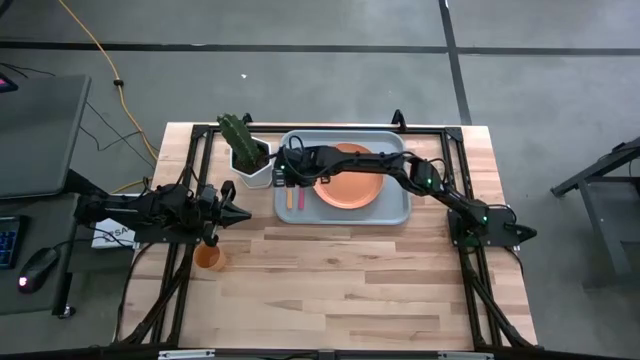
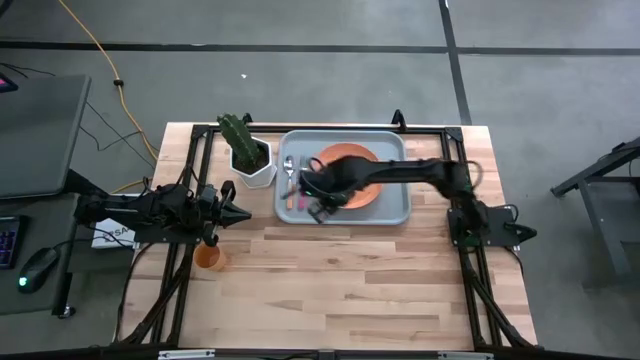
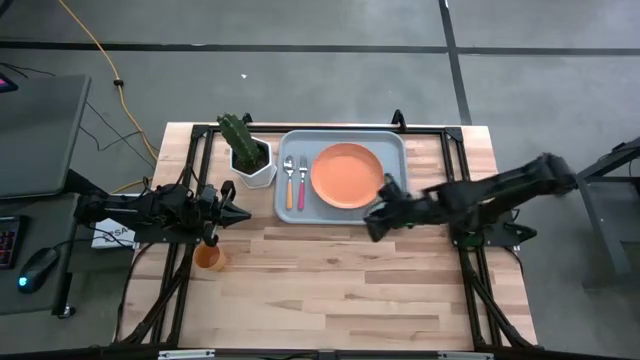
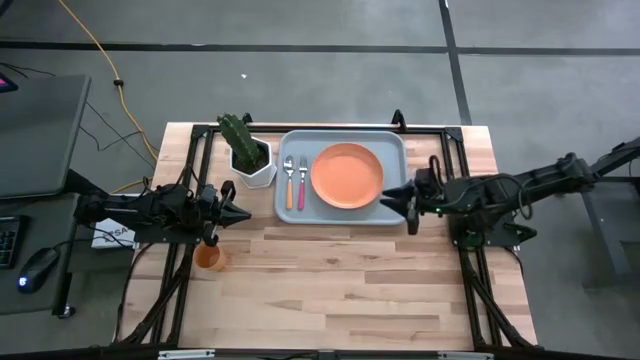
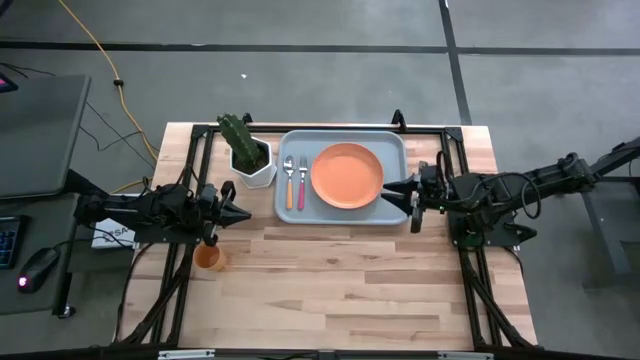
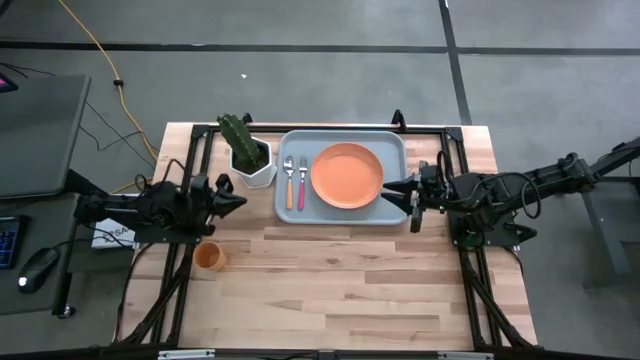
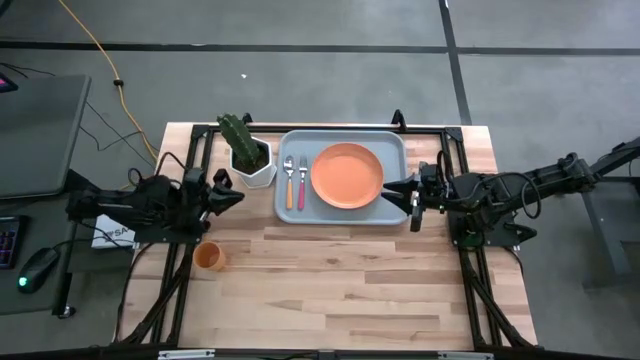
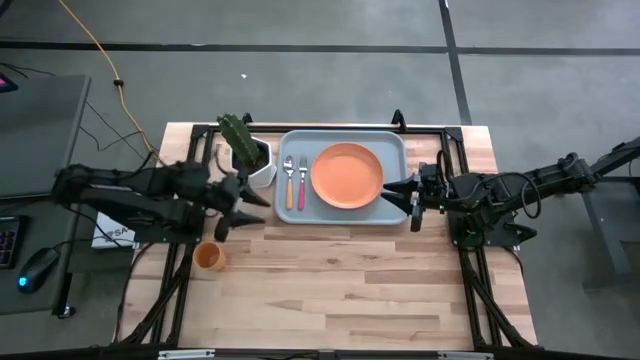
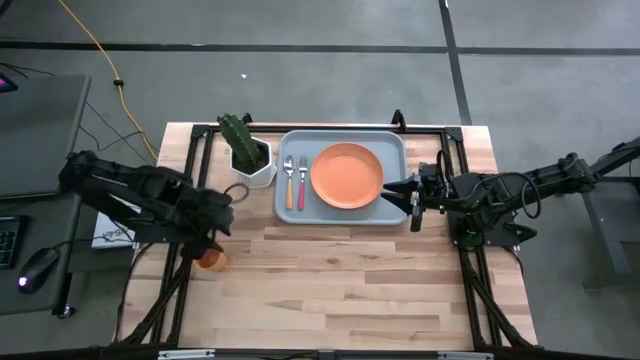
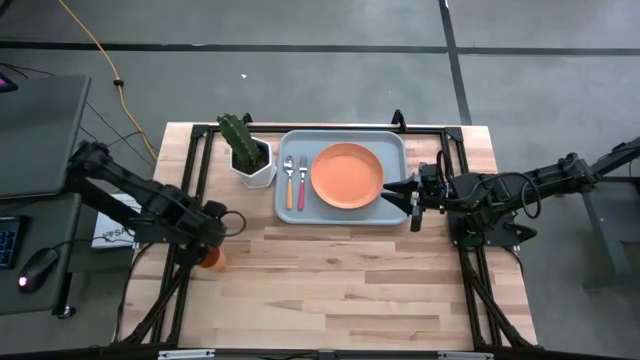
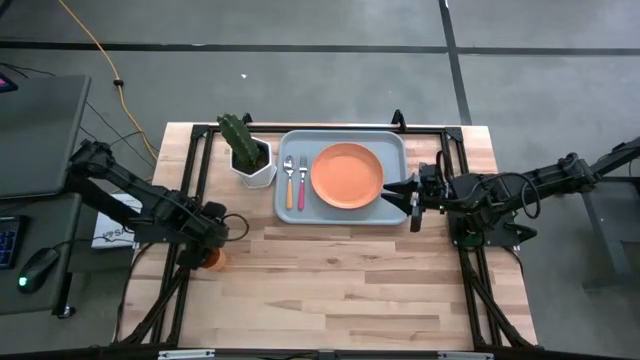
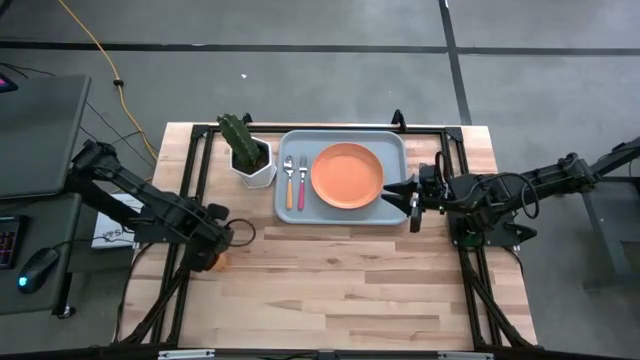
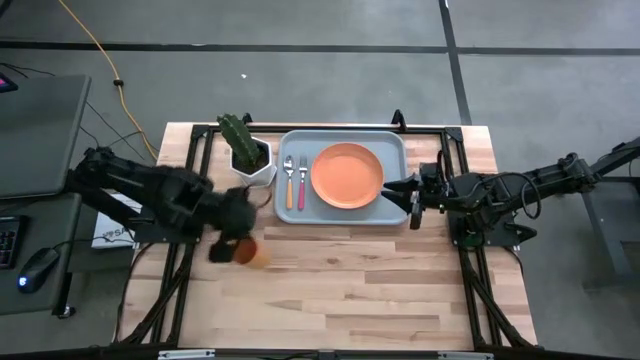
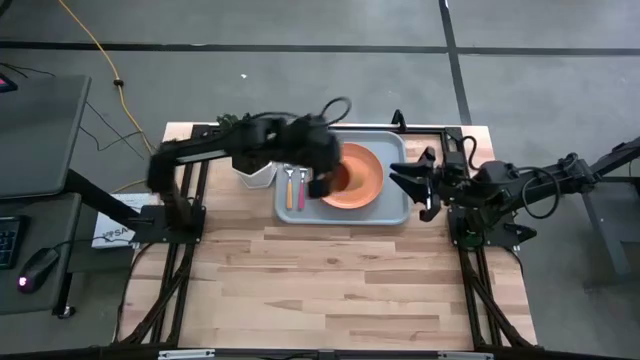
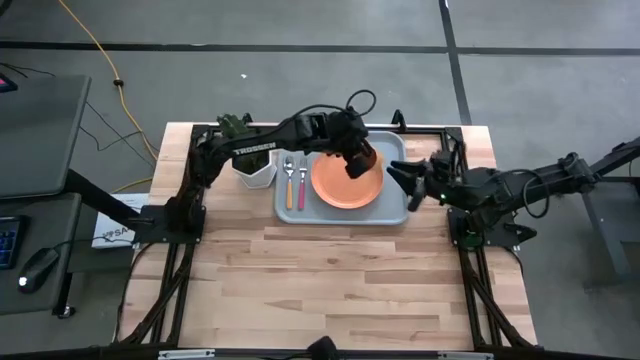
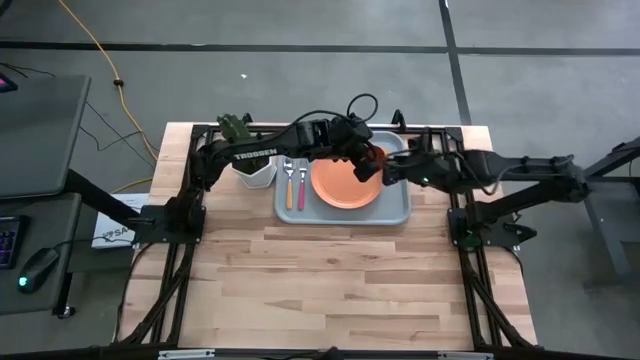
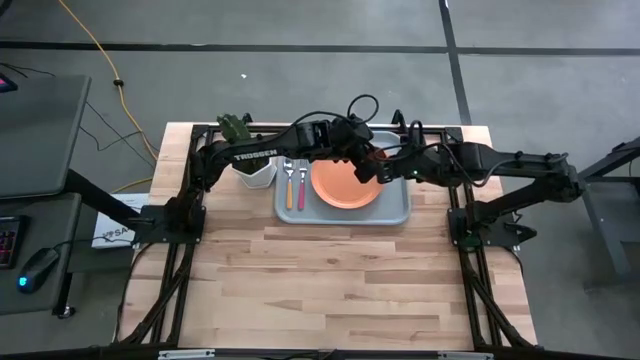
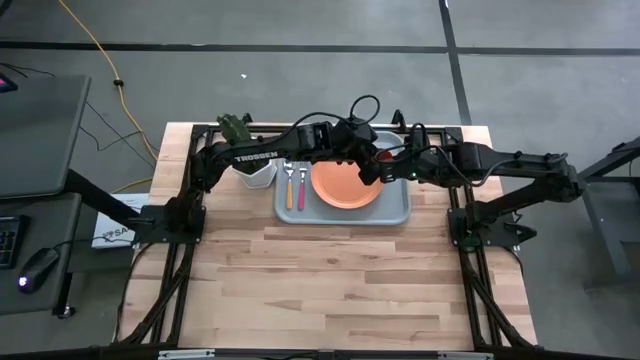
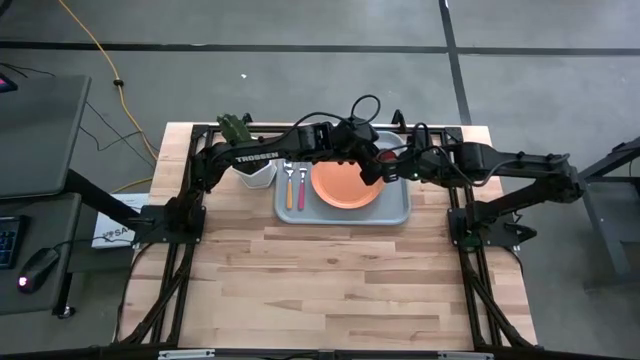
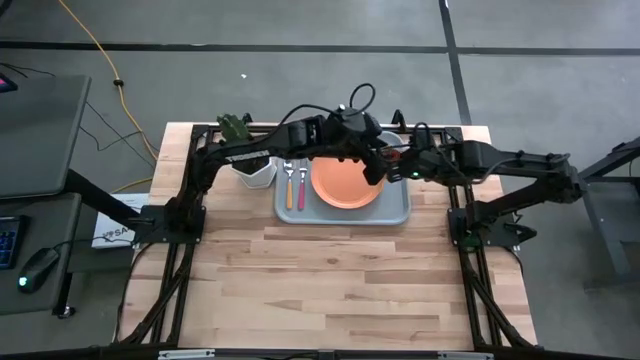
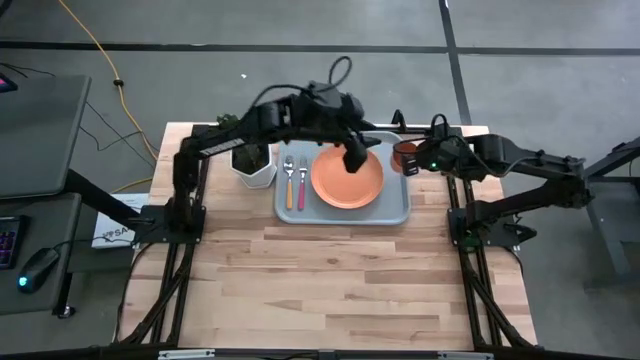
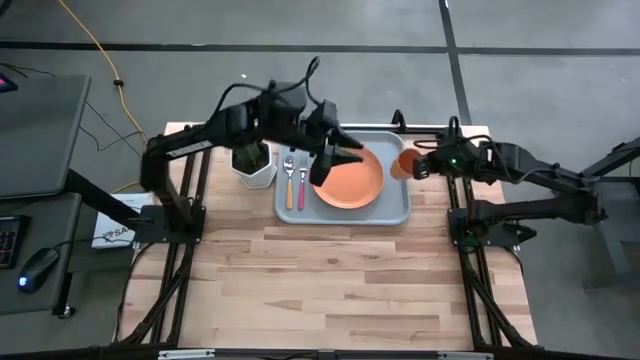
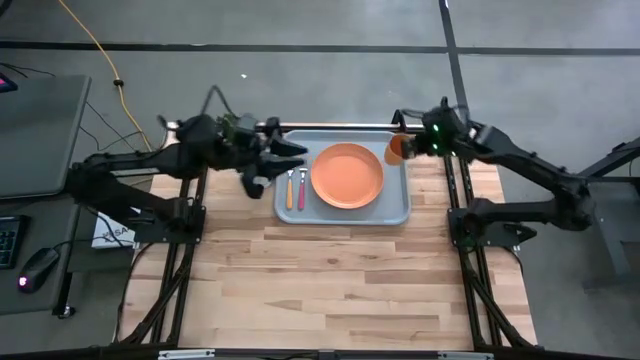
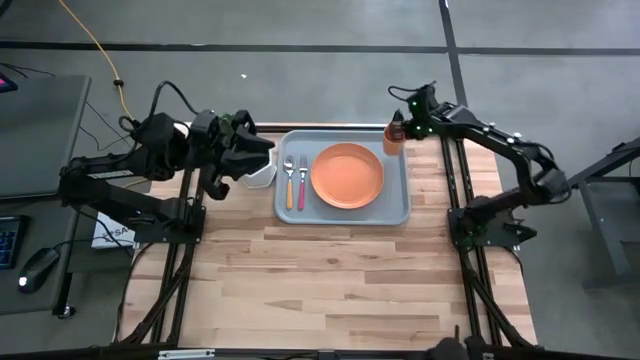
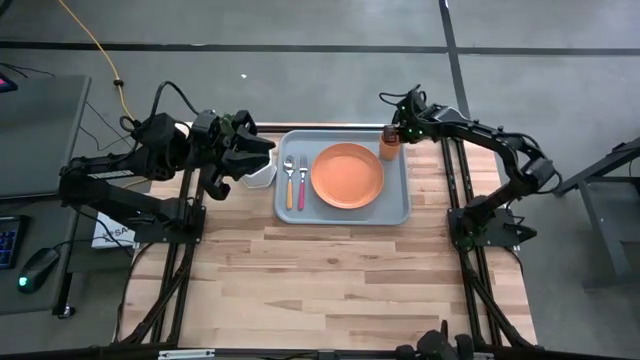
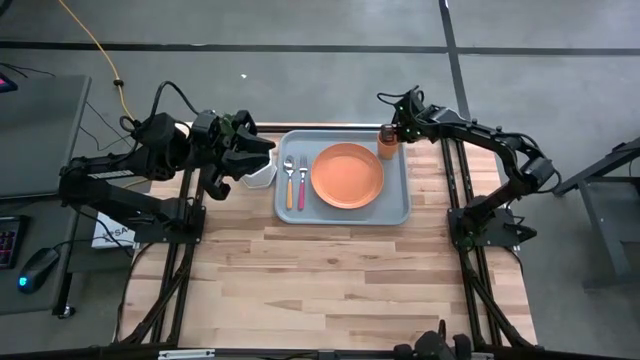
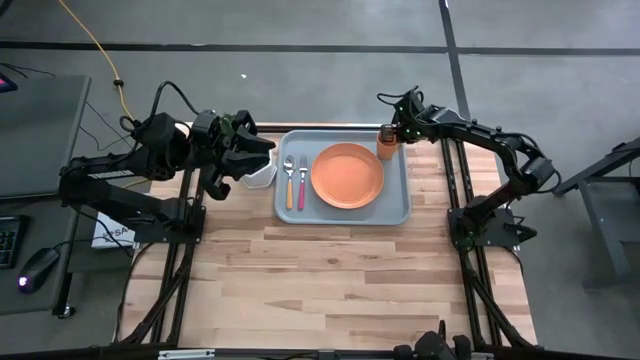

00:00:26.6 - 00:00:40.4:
Task: Pick and place plate/cup/fork/spoon on tray
Put the yellow cup on the gray serving tray to the top right of the orange plate

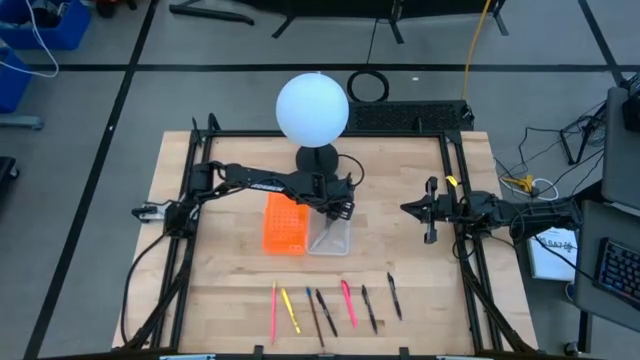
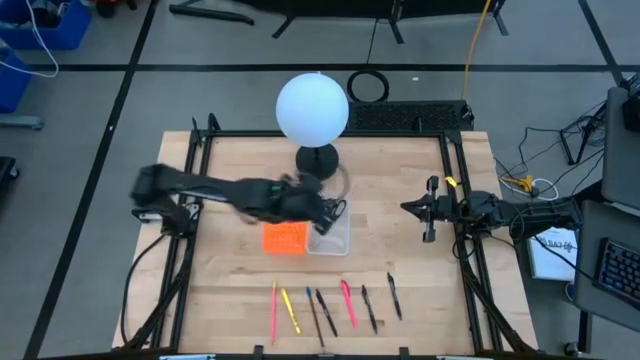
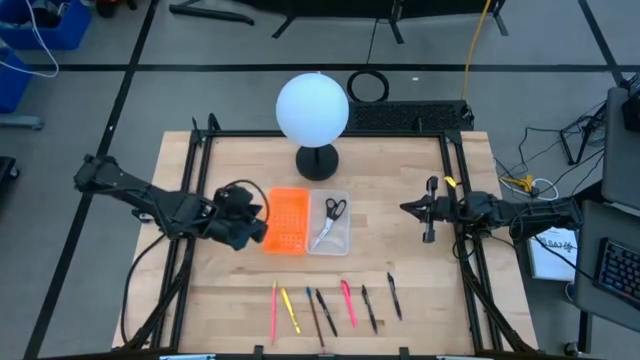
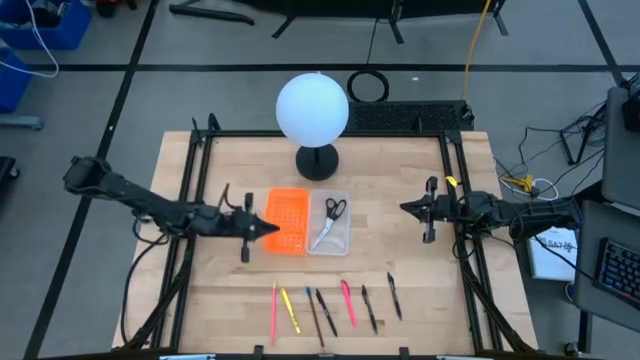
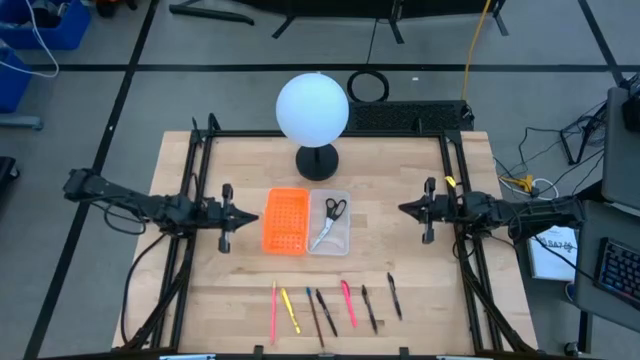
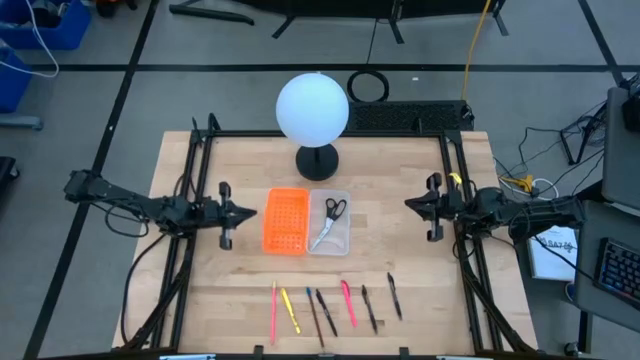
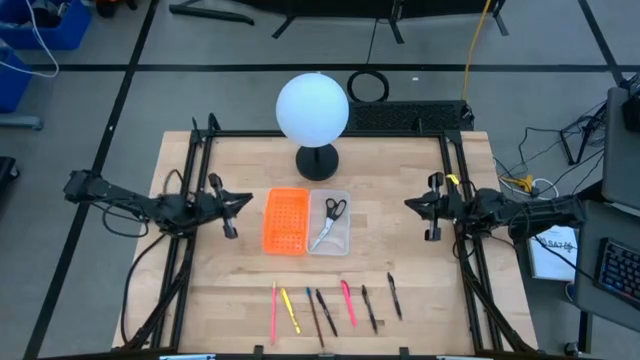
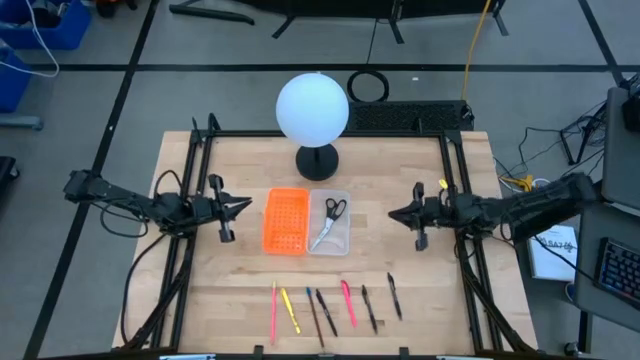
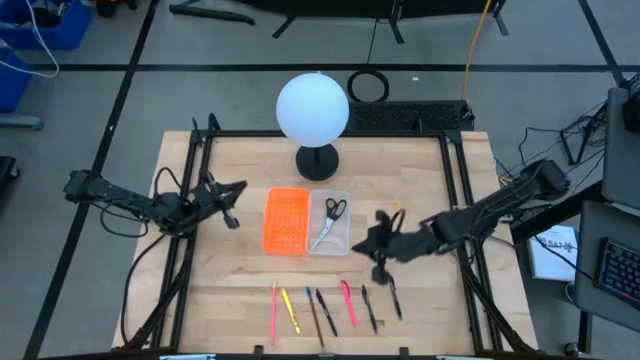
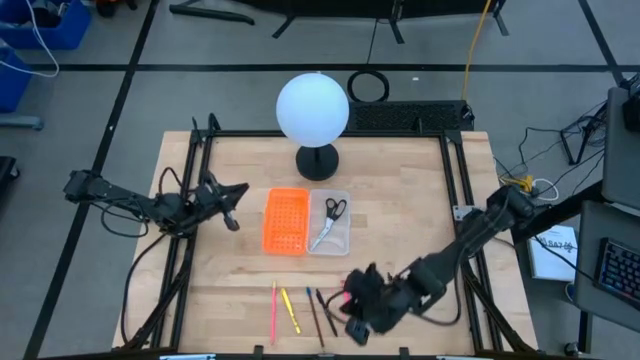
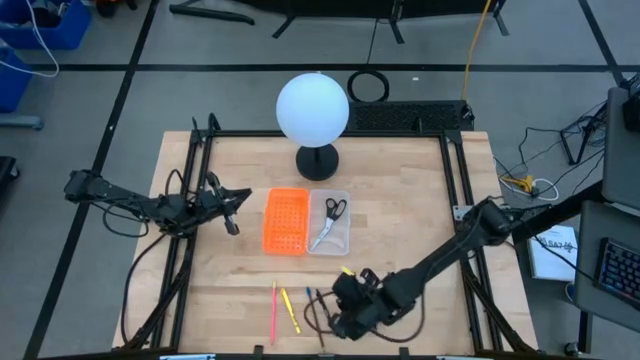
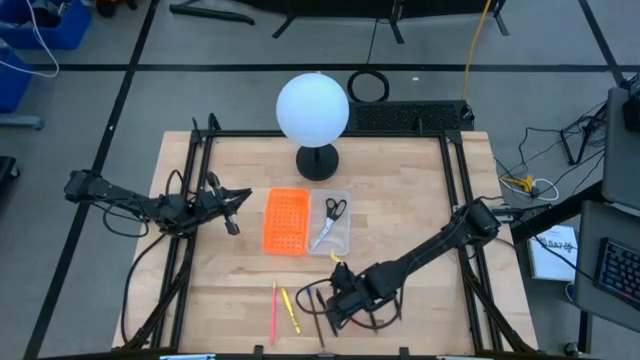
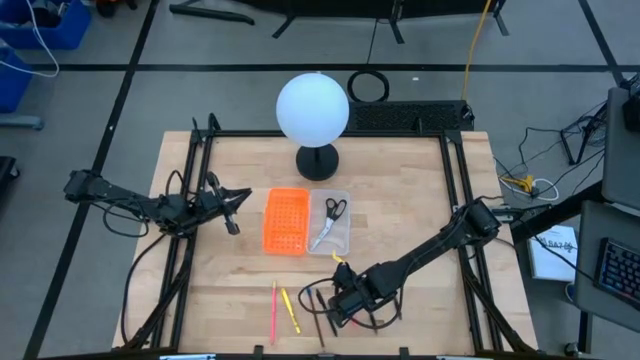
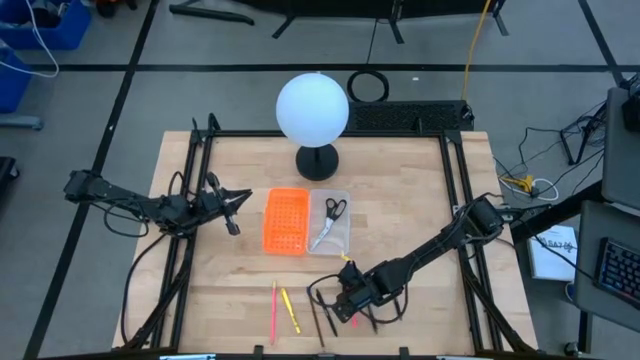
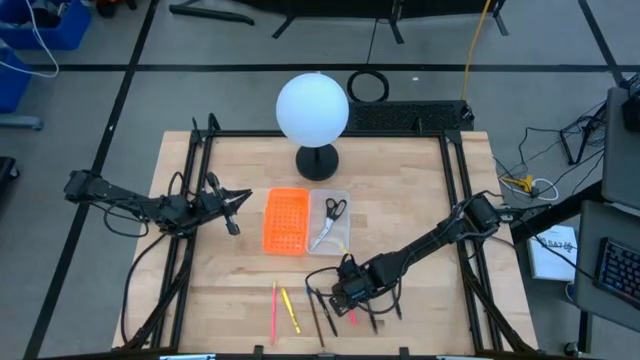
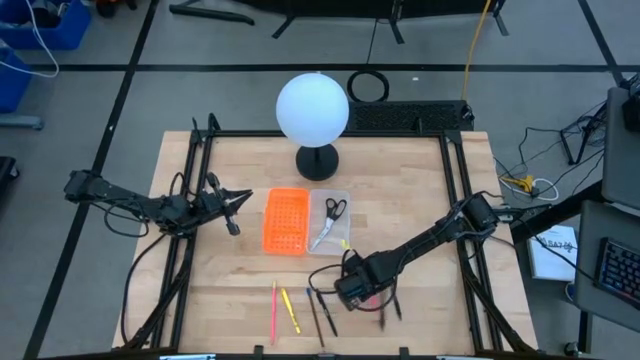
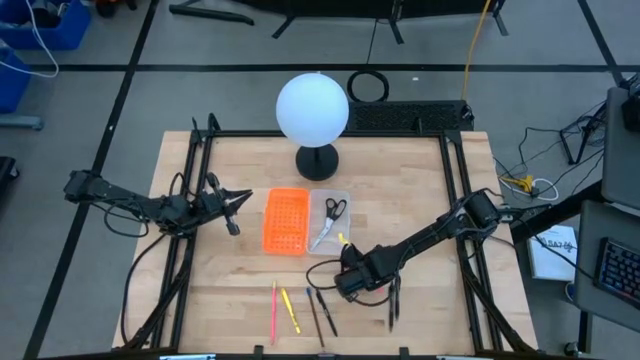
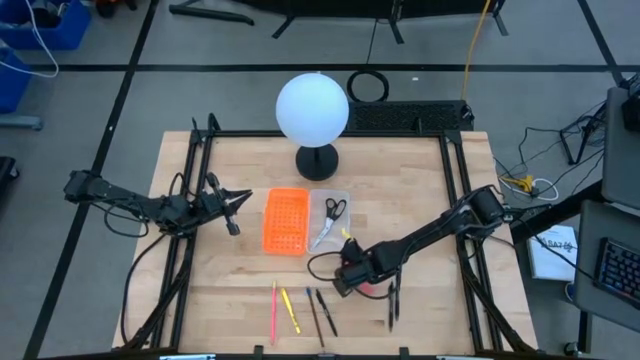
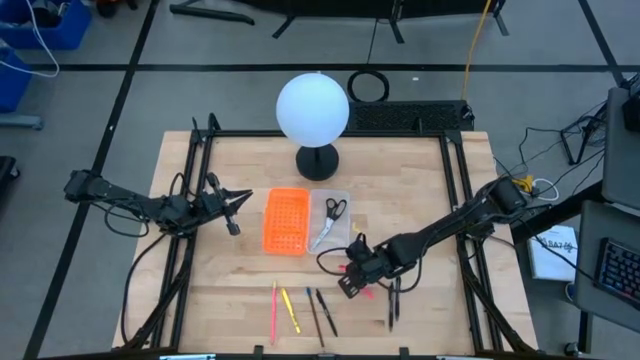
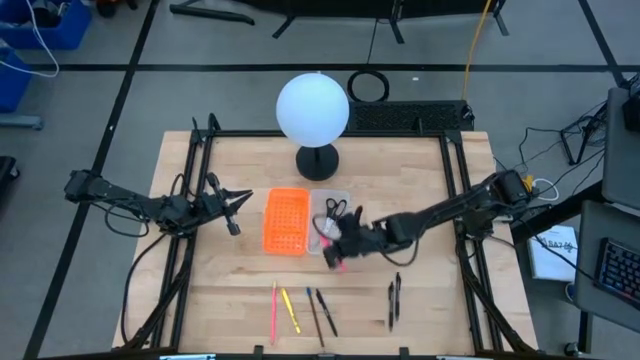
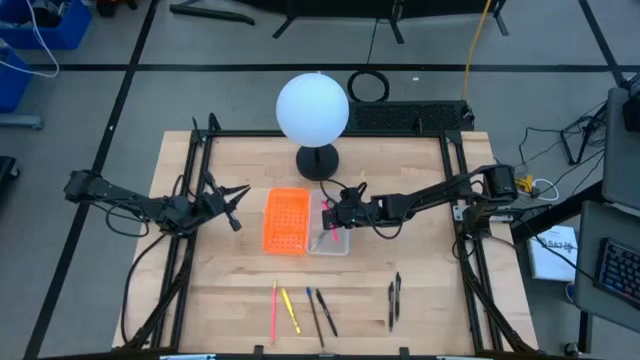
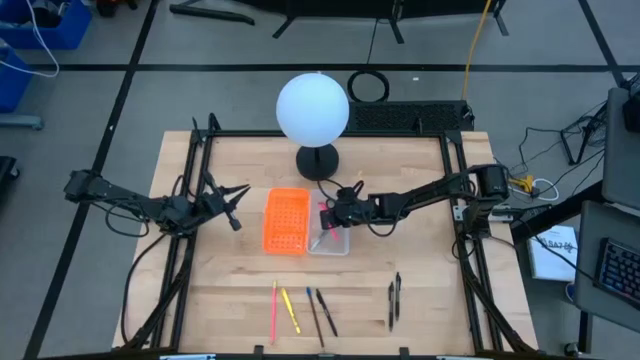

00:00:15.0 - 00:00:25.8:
Task: Pick & place school supplies into a supply box
Put the pink pen into the orange supply box
